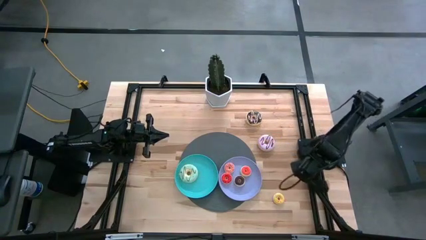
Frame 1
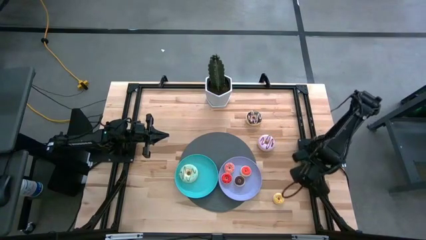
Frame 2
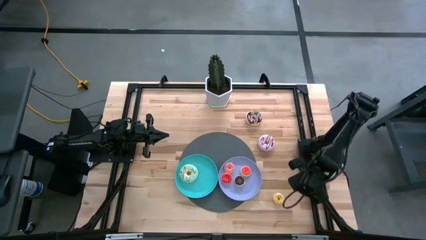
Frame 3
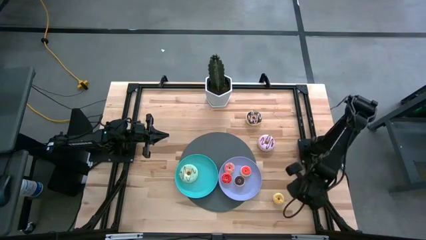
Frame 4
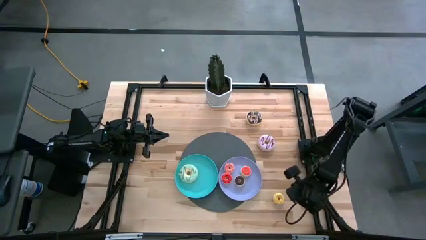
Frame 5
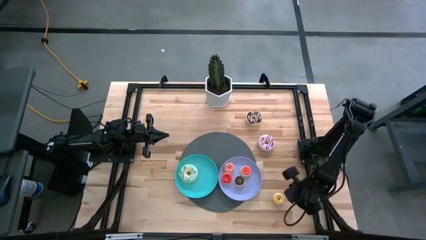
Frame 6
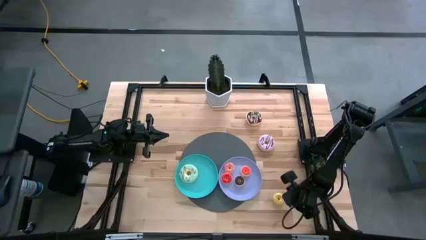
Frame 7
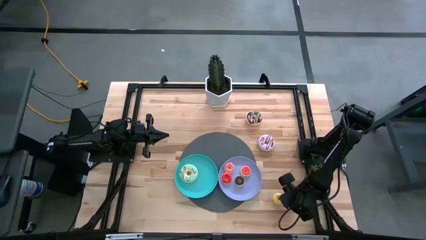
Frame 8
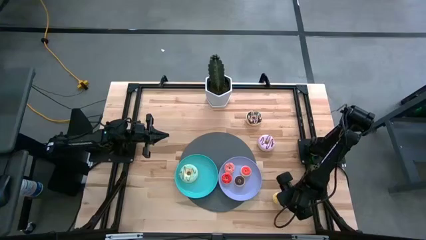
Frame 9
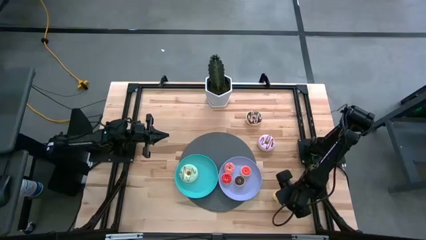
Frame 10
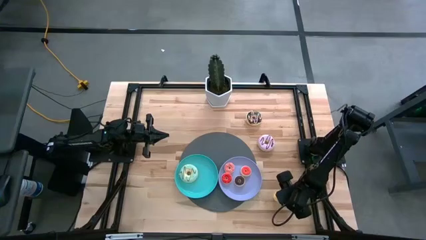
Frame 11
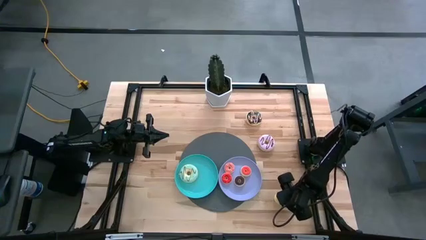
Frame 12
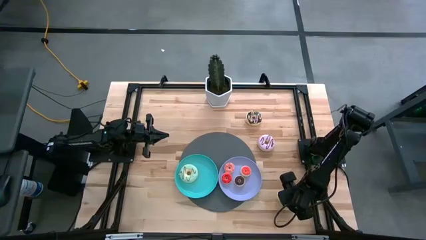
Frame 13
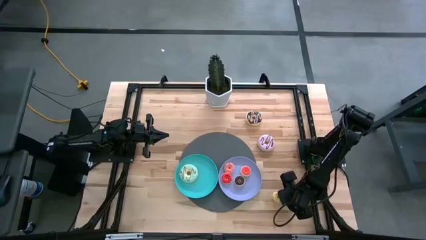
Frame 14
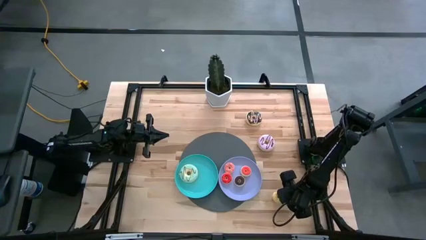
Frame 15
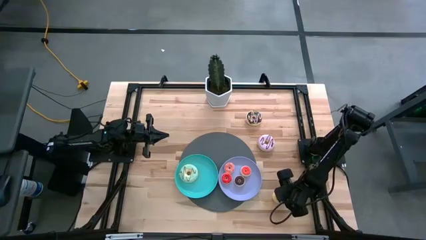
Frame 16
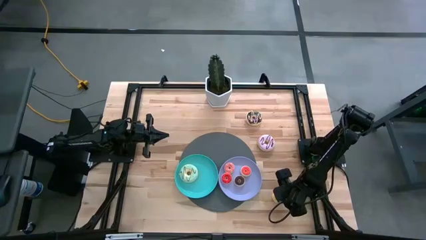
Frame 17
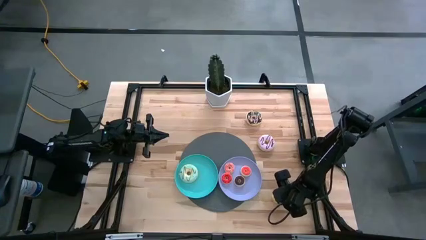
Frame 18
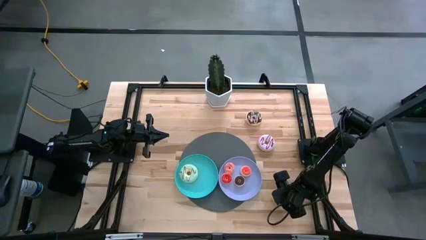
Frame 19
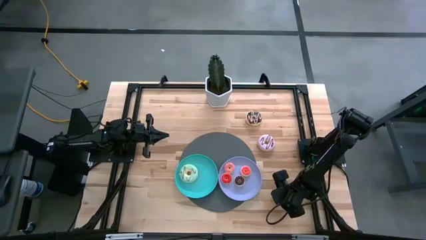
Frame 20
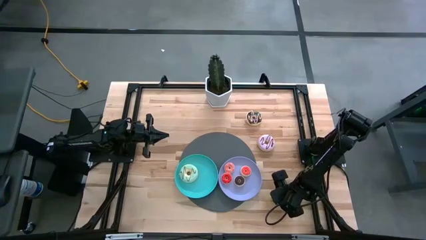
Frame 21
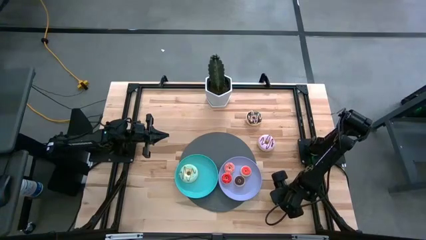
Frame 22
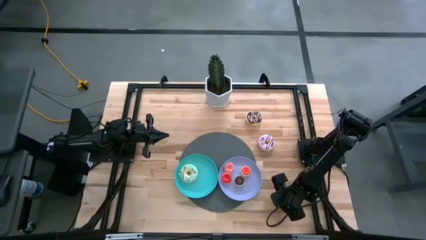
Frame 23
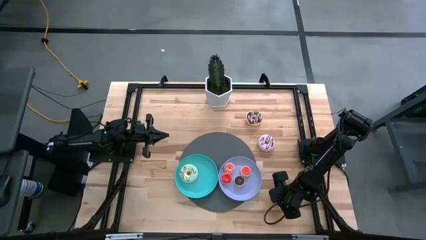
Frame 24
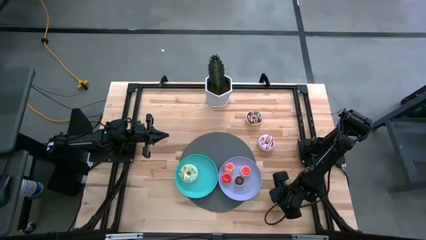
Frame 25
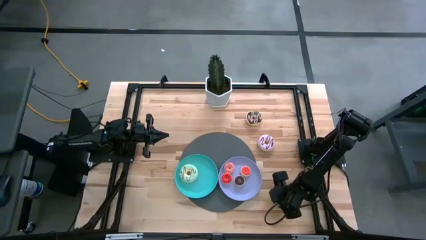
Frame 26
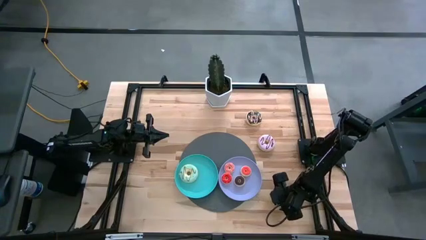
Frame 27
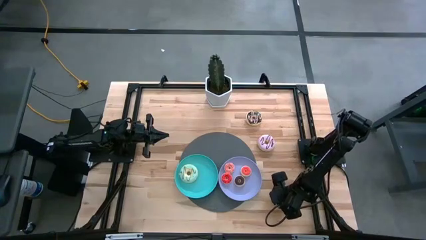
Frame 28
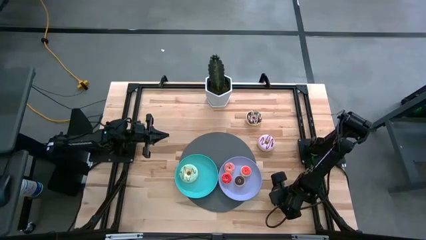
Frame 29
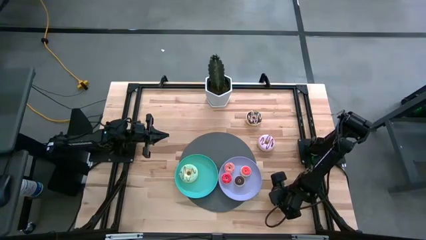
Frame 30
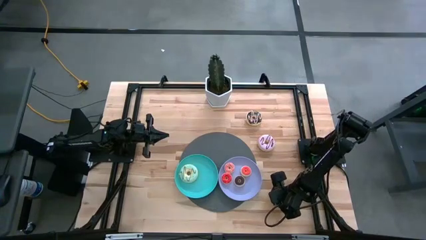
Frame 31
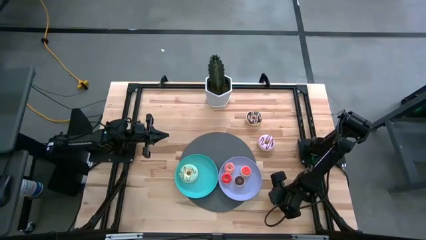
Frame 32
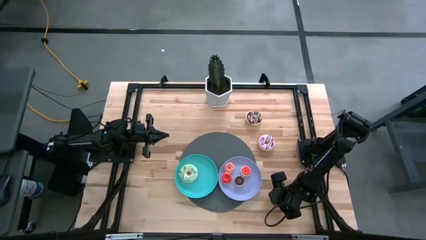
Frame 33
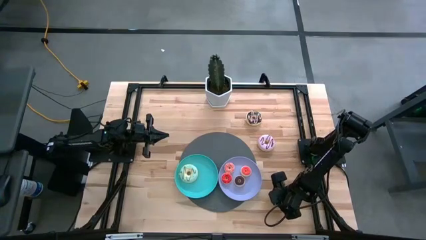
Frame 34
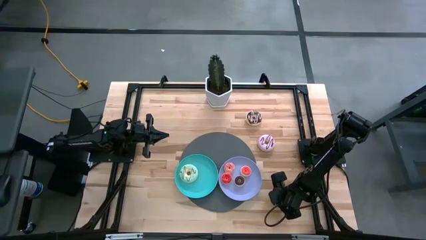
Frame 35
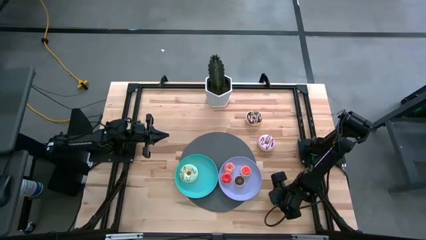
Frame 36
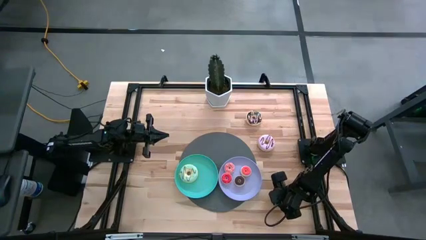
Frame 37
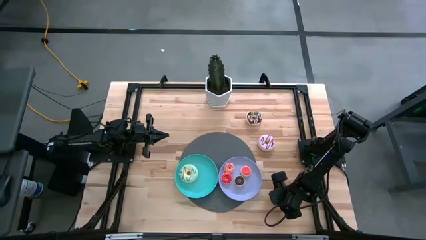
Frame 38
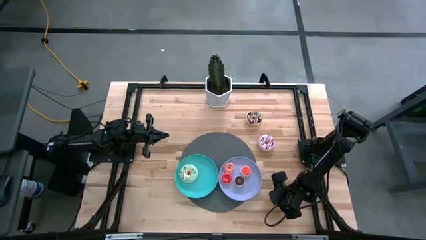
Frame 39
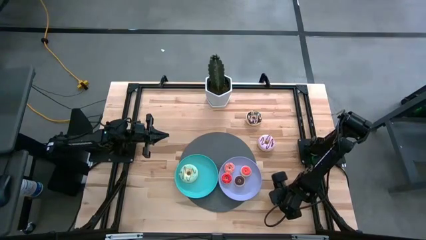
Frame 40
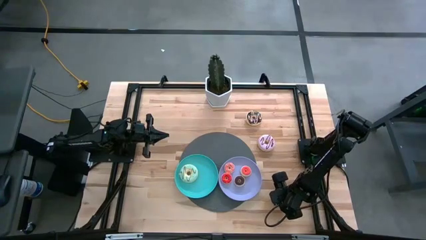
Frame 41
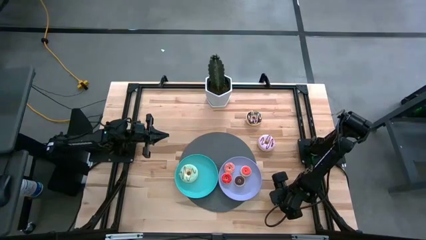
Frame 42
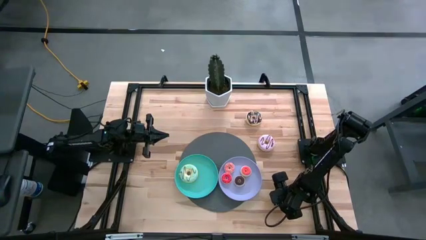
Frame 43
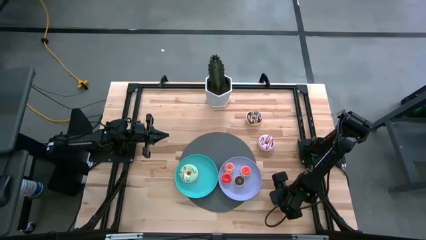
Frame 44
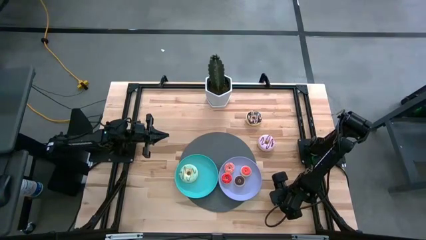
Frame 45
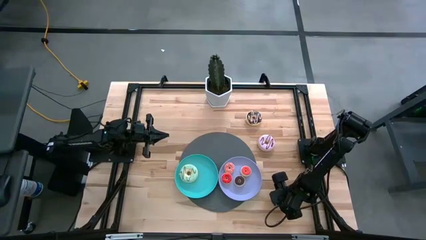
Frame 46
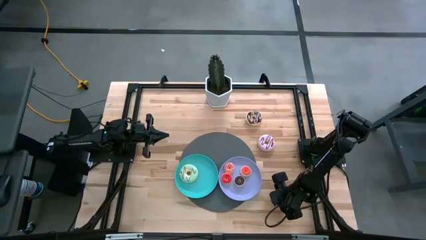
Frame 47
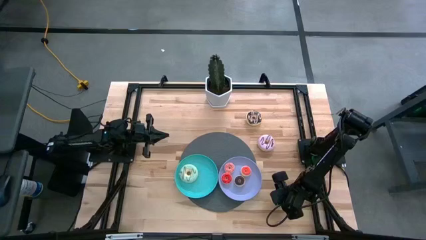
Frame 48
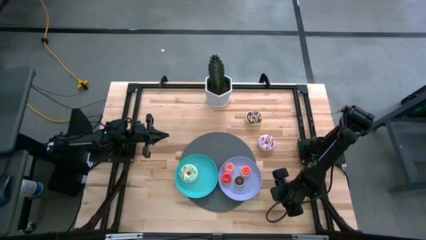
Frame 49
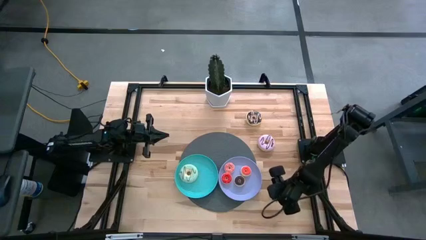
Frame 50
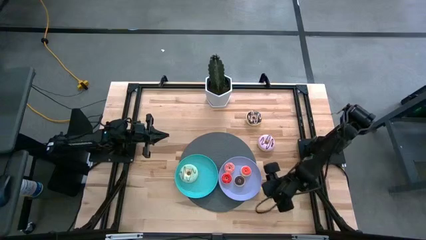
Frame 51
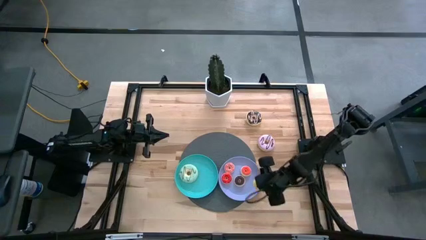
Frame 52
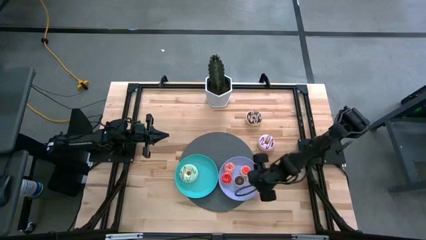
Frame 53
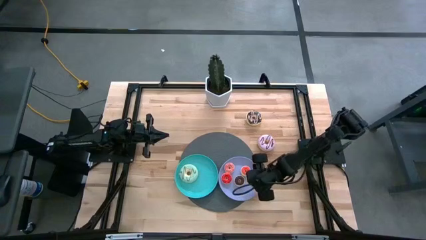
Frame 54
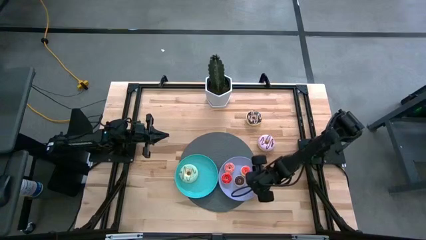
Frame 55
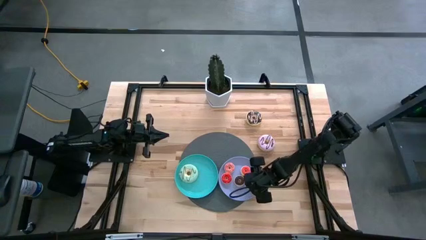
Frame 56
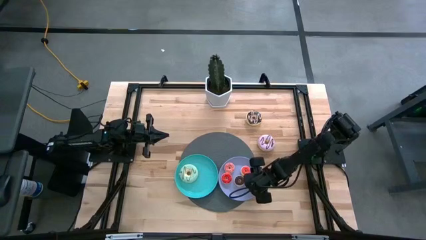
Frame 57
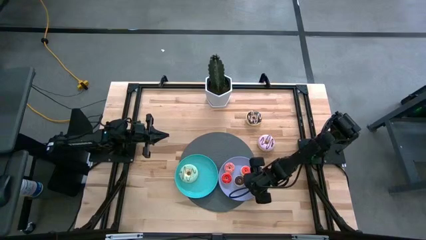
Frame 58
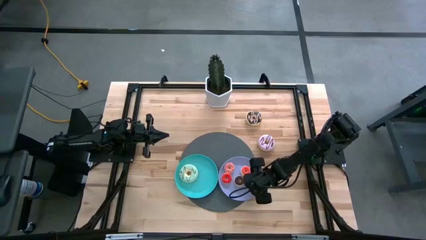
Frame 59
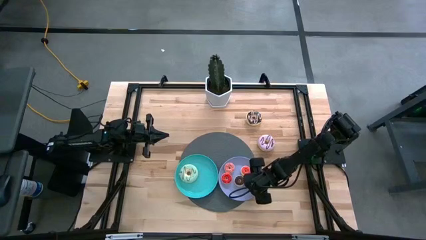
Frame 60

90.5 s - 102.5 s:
Task: Pick & Place donuts
Put the small yellow donut on the purple plate

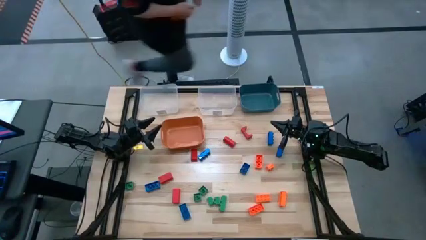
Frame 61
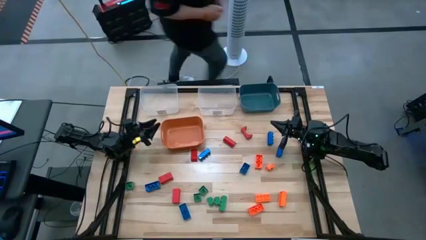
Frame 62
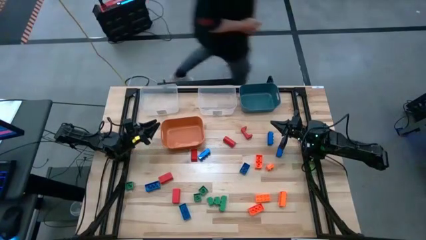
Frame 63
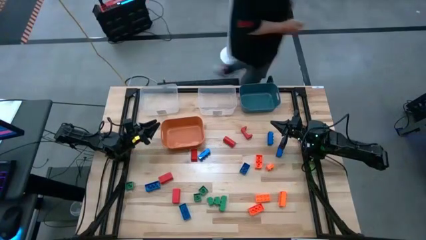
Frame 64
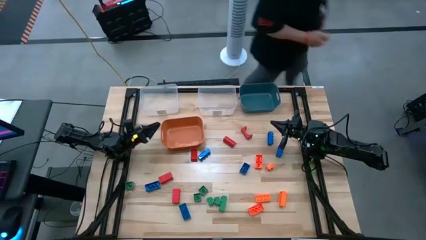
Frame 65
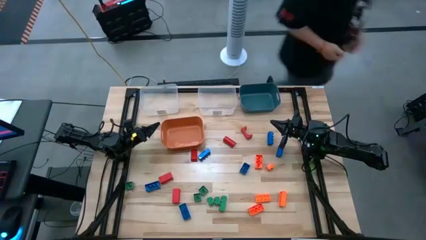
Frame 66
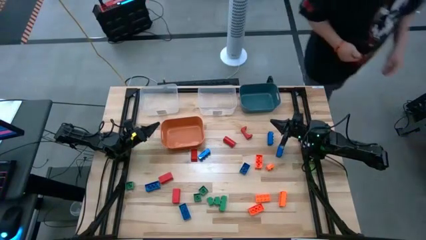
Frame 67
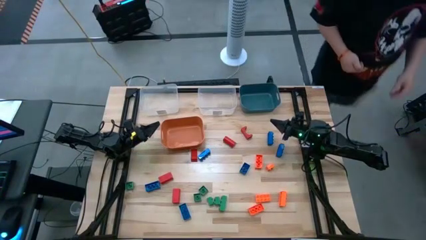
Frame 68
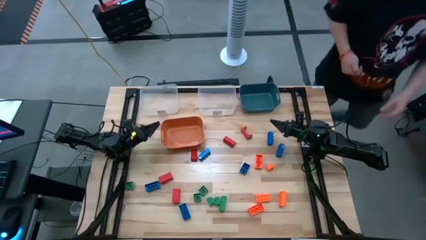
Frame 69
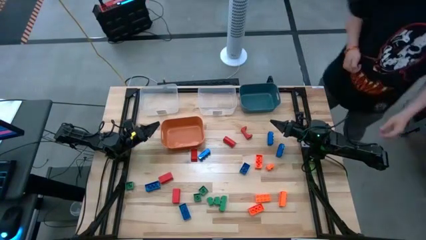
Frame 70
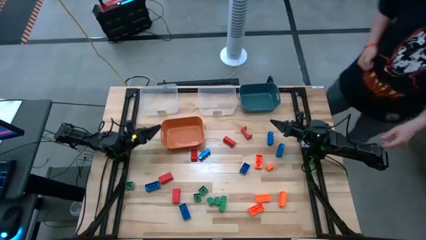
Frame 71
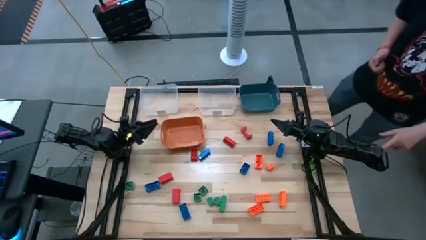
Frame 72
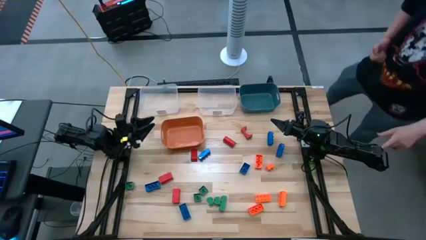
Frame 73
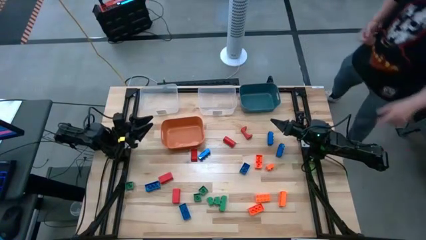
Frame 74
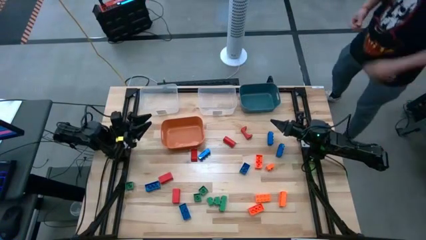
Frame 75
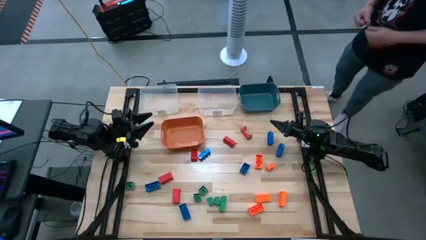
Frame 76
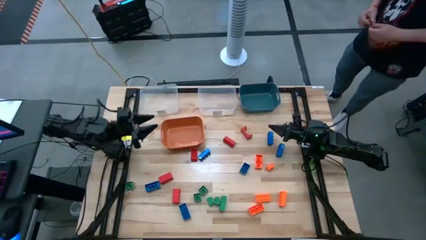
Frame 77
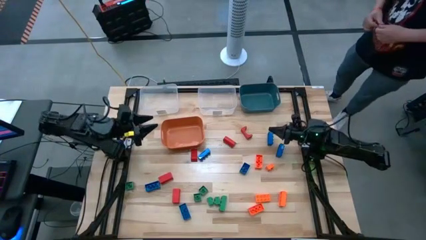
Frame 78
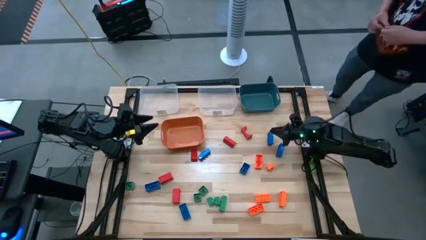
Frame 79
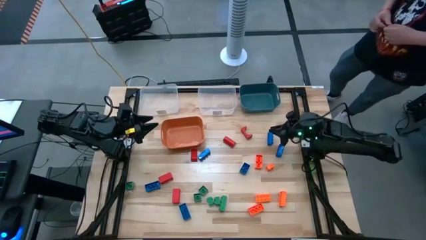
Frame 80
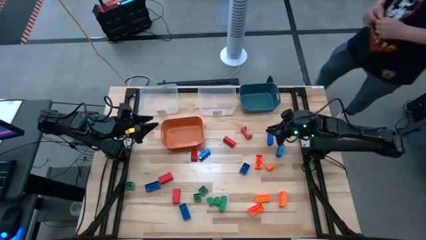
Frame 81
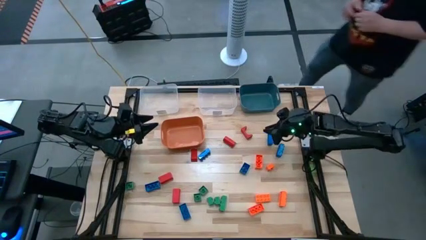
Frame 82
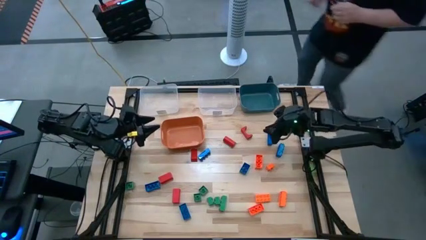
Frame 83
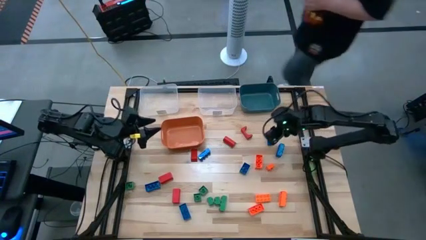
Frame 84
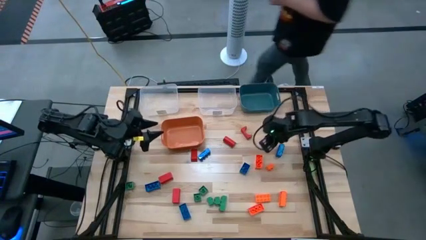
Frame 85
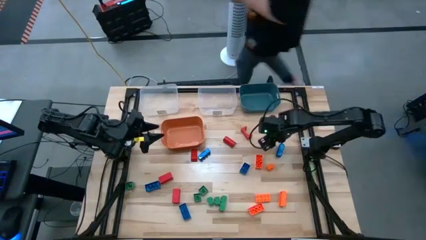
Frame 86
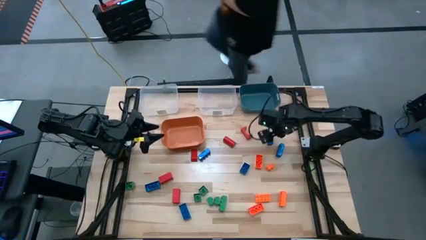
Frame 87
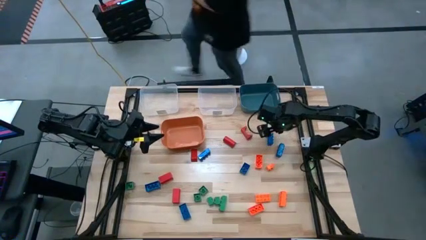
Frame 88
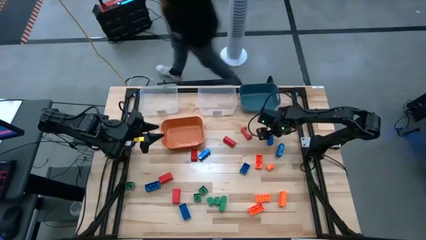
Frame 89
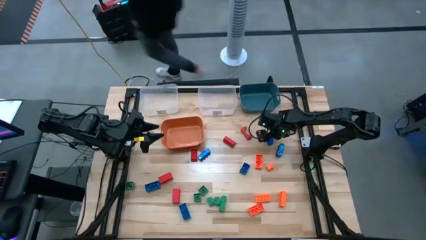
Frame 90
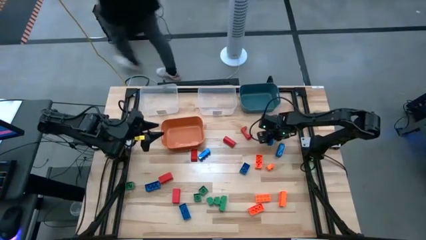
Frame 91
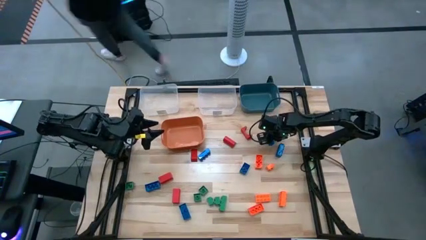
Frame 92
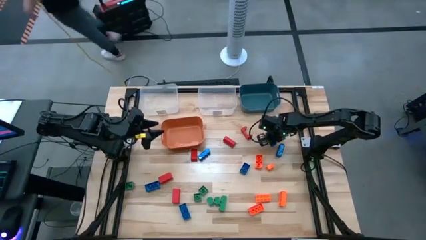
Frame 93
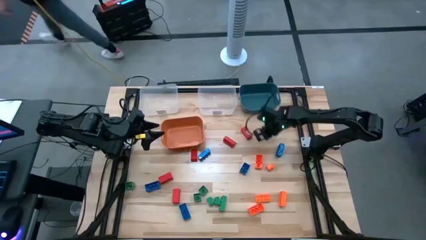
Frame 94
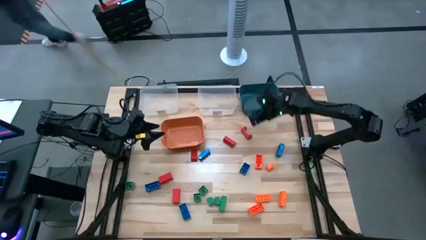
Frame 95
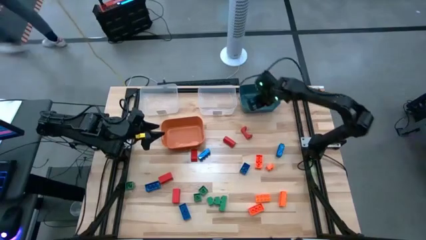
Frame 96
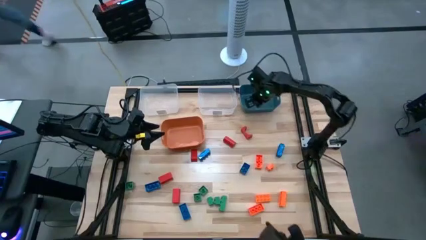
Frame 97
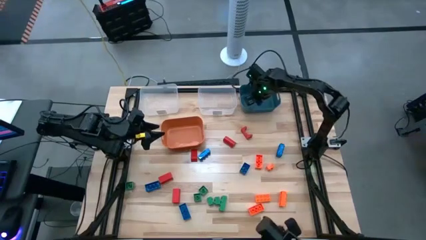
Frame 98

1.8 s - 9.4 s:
Task: Sort blocks
Put the blue game piece into the blue bin
